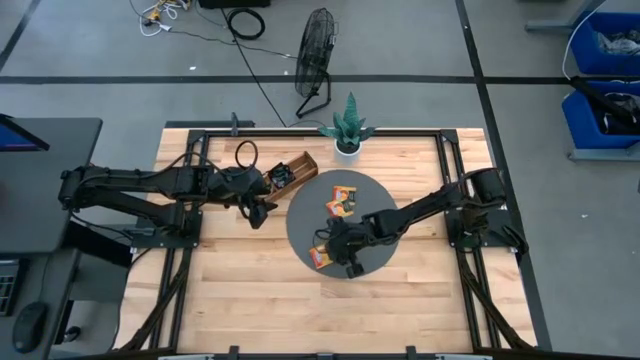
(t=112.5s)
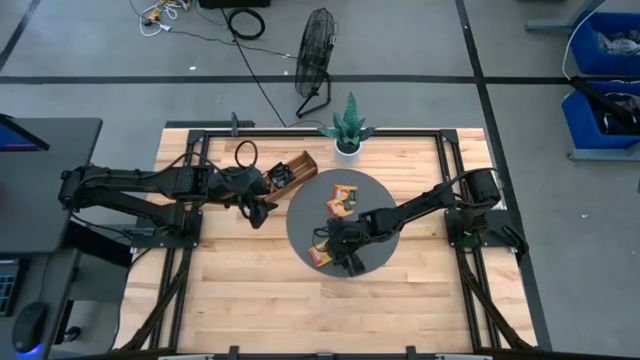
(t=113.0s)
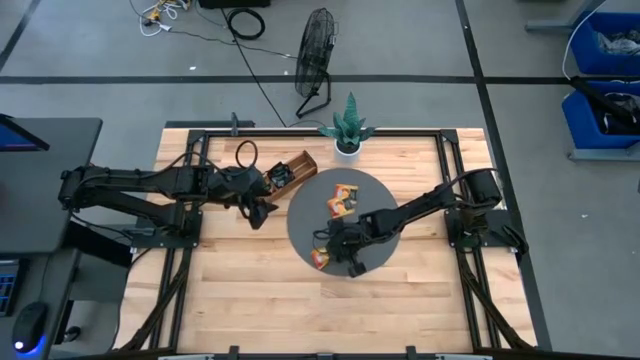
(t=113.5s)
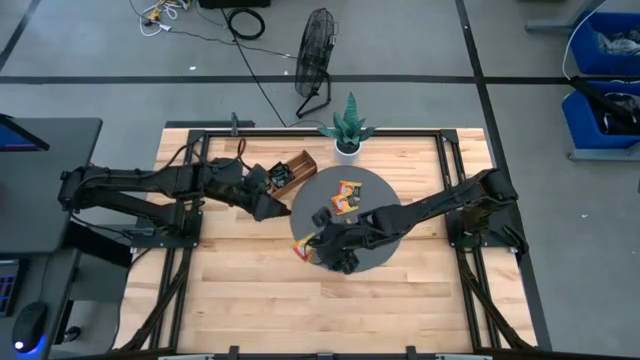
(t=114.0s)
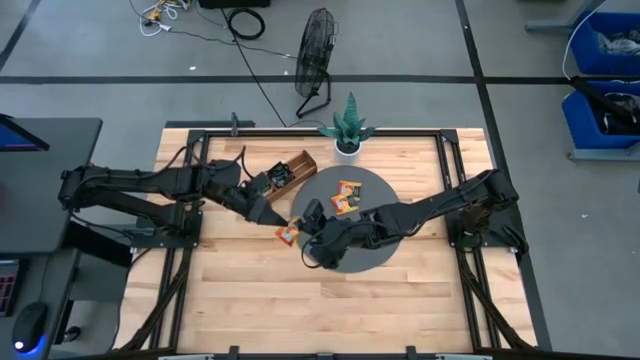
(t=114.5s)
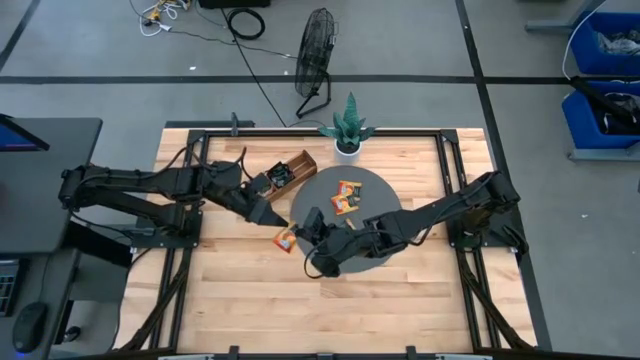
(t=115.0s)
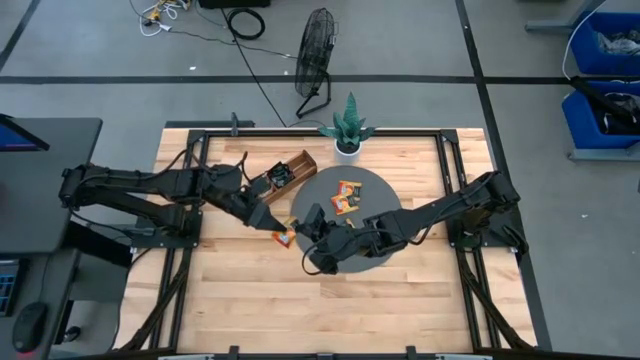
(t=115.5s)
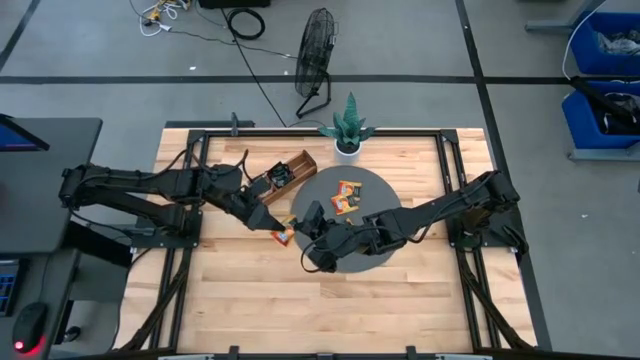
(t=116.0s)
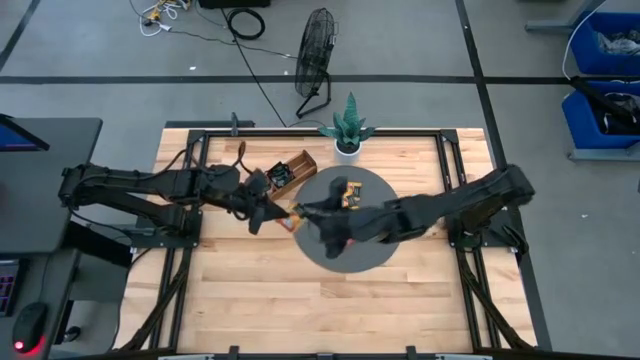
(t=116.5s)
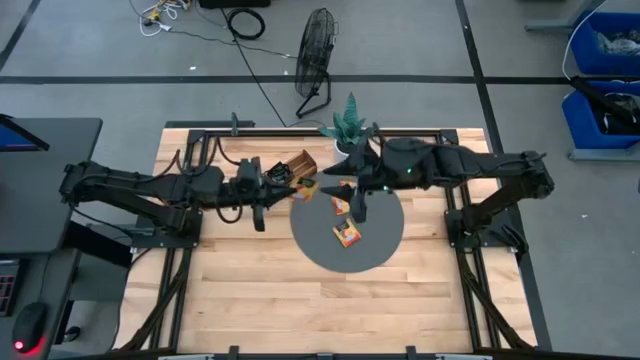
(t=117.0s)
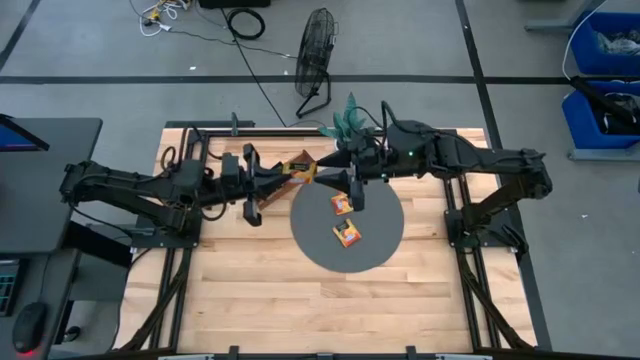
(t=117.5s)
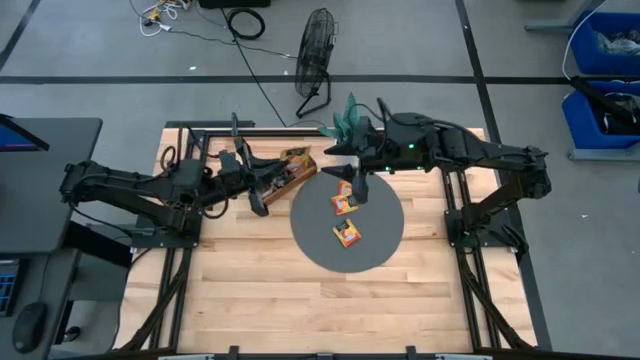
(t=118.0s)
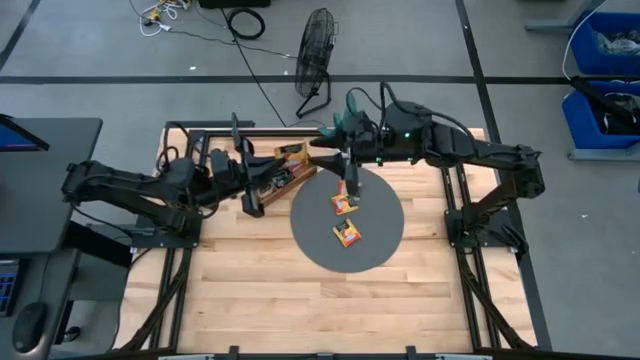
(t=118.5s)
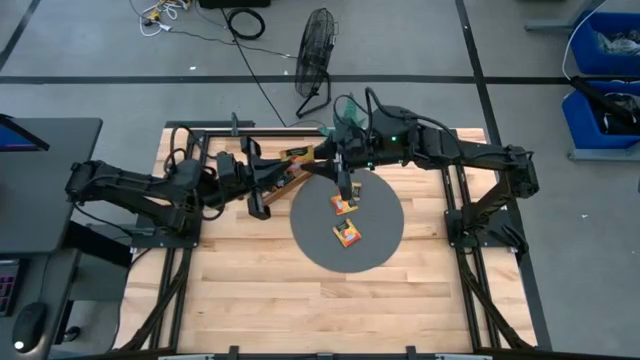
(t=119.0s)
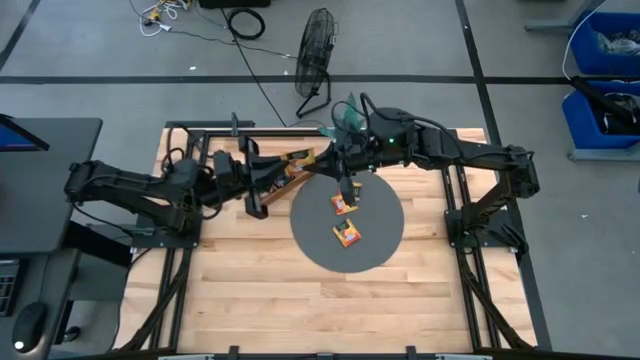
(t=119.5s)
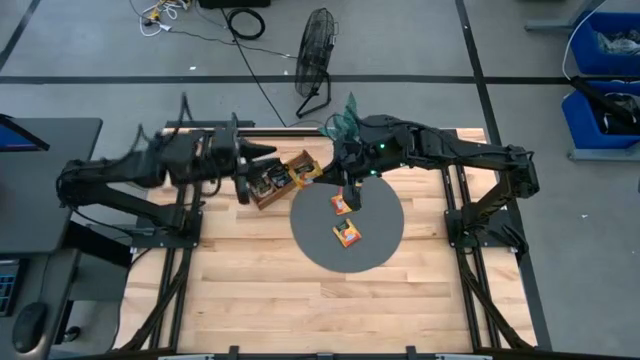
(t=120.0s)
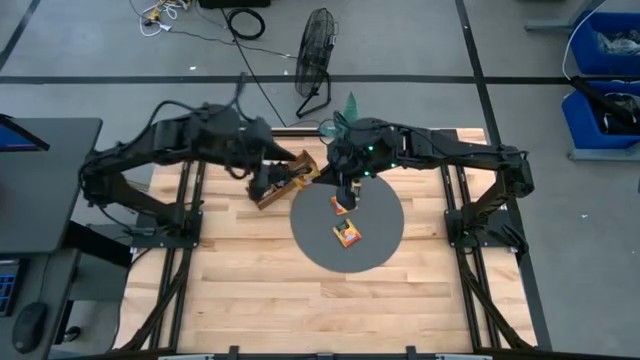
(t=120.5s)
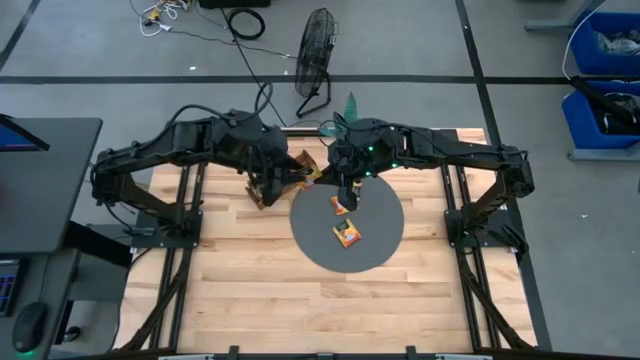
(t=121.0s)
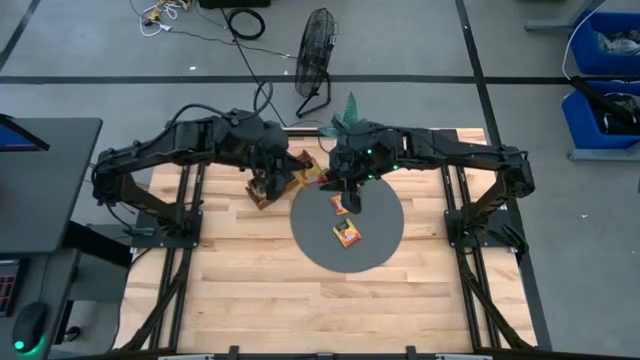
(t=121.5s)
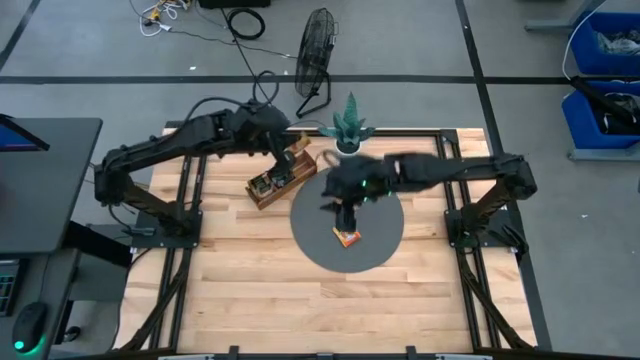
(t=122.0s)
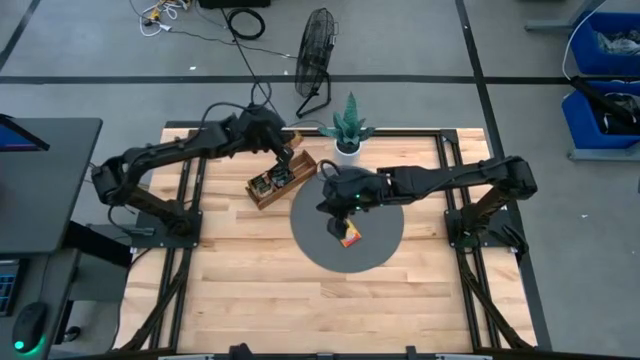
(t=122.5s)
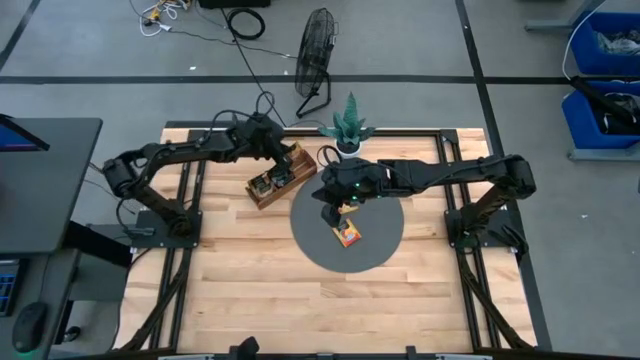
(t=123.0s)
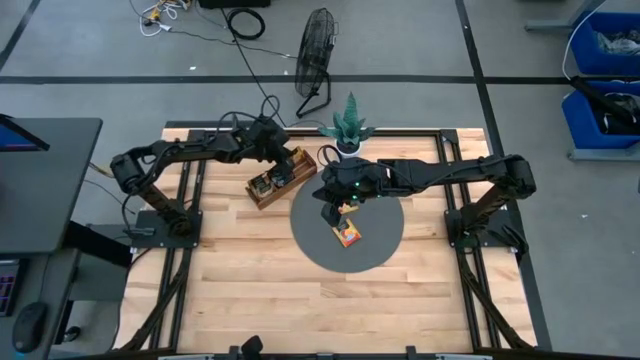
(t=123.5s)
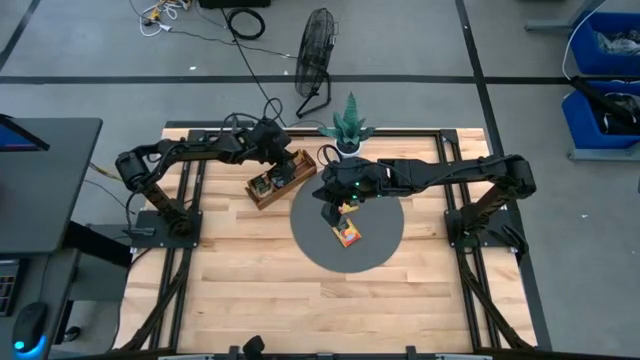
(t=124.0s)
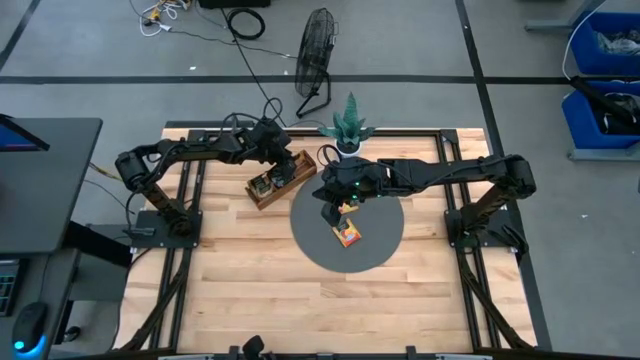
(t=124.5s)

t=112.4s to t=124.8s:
Task: Pick & Place Tea
Put the orange tea bag into the right section of the wooden organizer

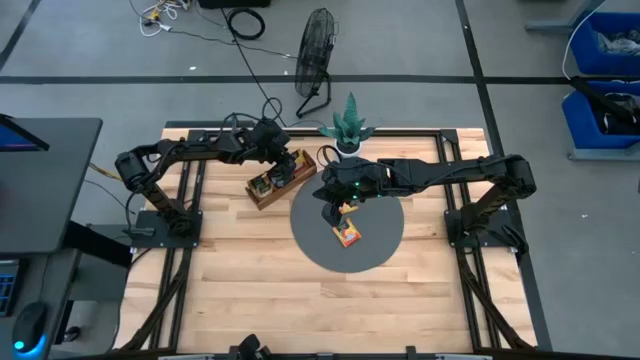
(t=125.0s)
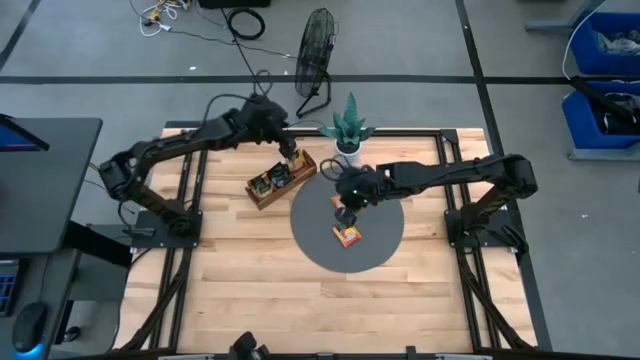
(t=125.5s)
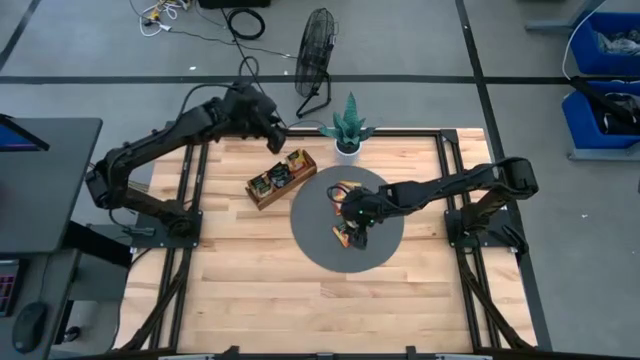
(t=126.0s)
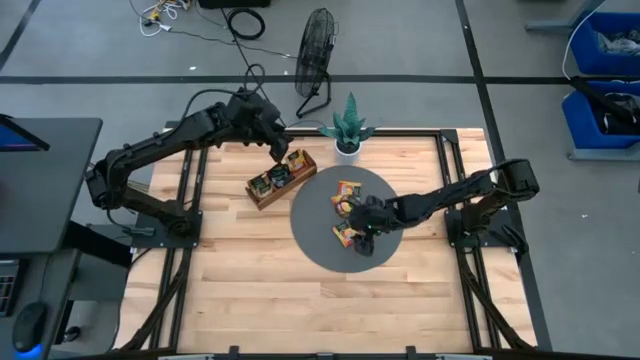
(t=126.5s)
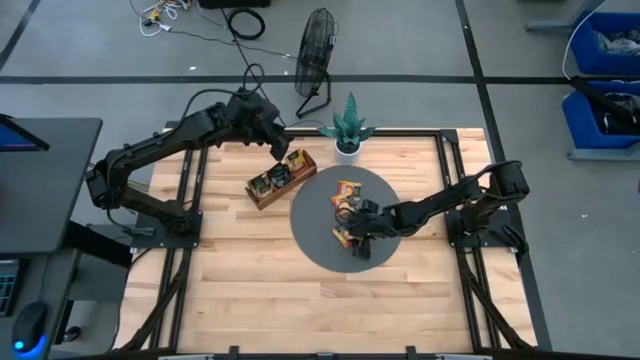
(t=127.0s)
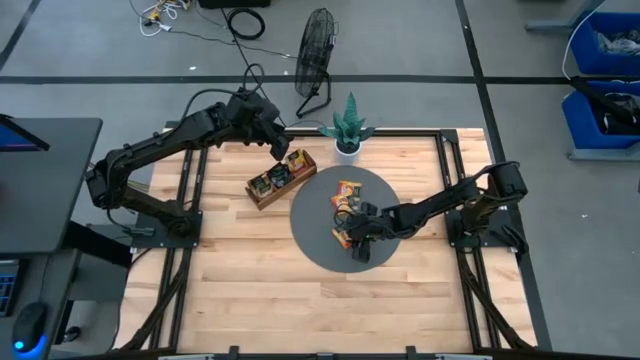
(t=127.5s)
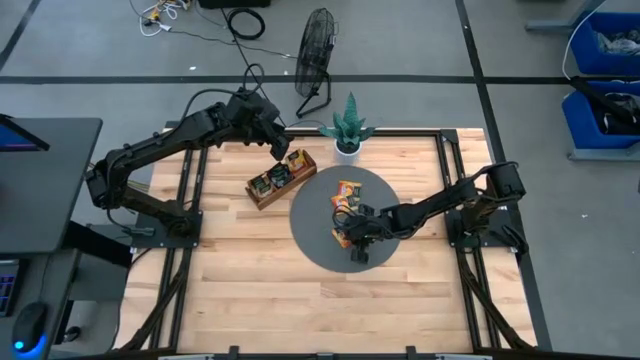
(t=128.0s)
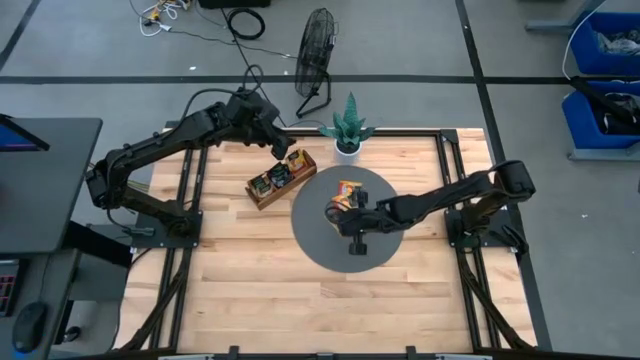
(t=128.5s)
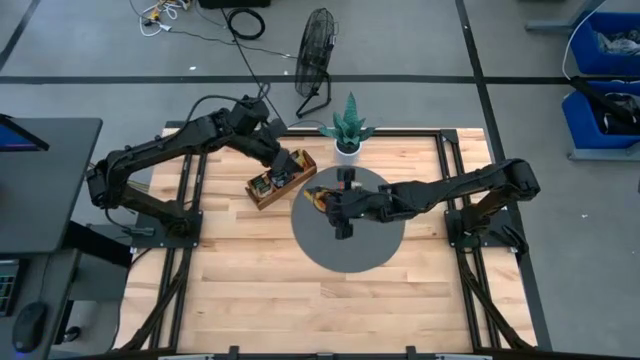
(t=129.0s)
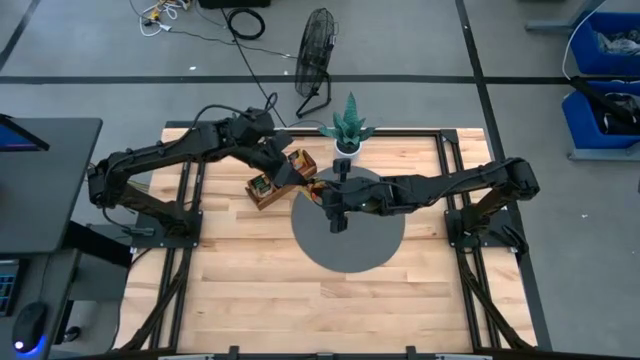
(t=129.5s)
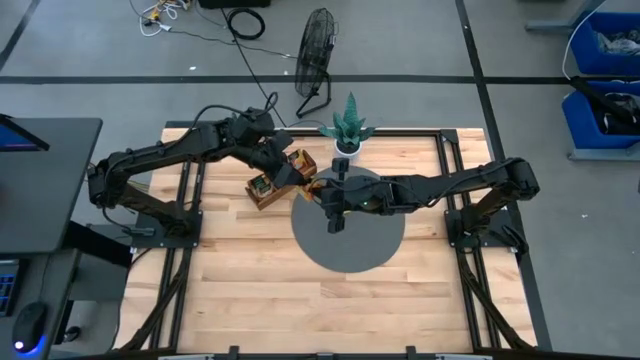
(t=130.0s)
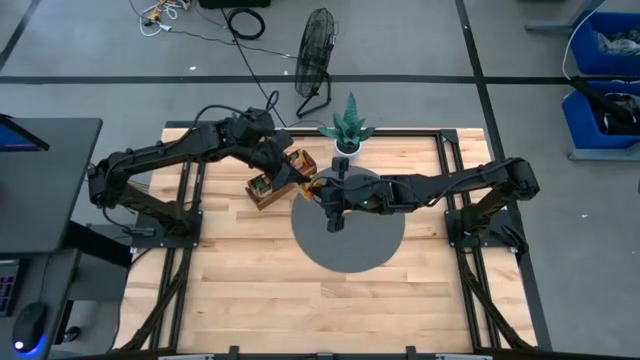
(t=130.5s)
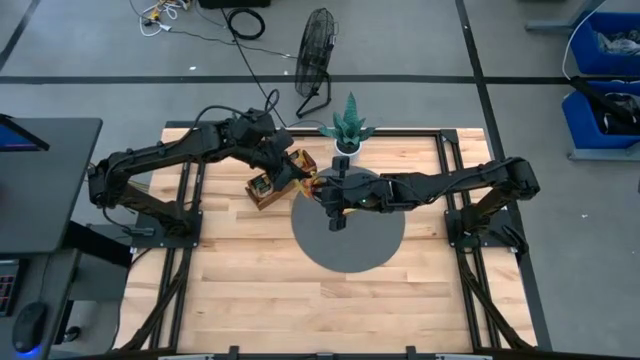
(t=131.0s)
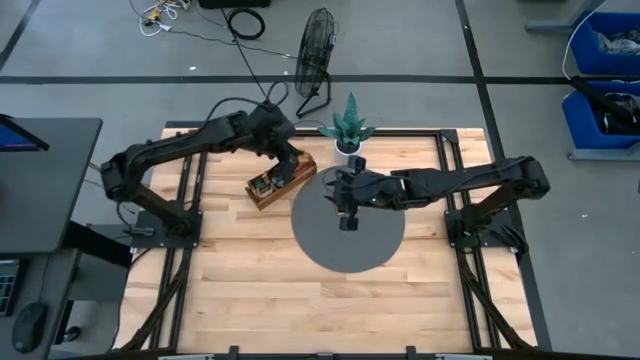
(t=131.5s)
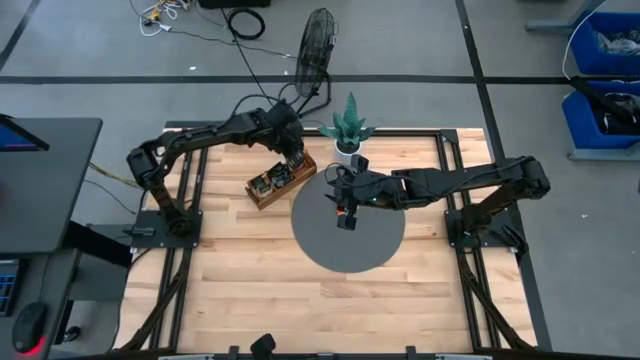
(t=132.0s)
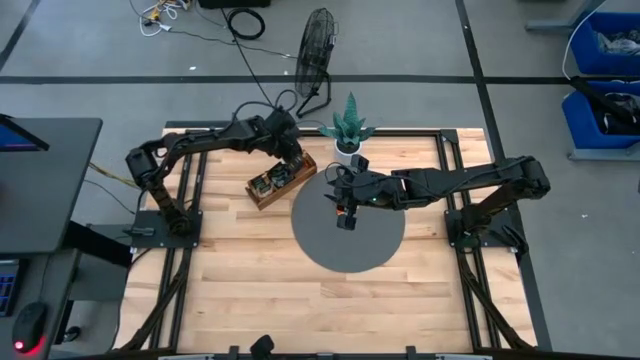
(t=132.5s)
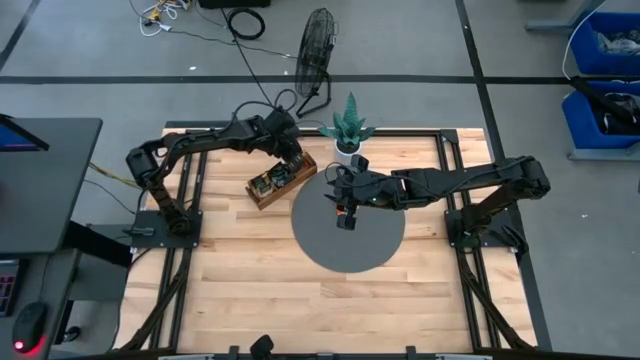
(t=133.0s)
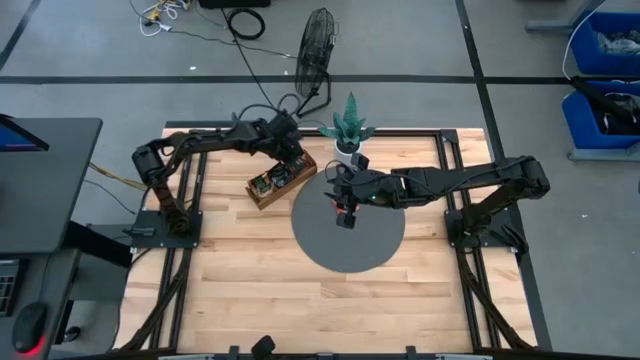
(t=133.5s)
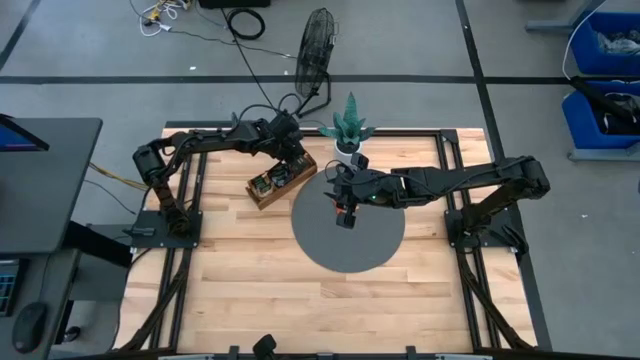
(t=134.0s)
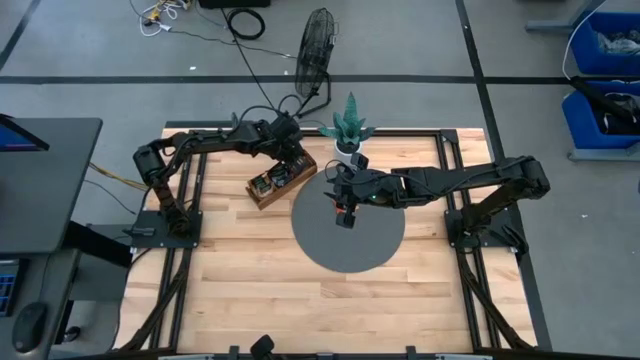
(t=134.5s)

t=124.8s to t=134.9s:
Put the orange tea bag into the right section of the wooden organizer
